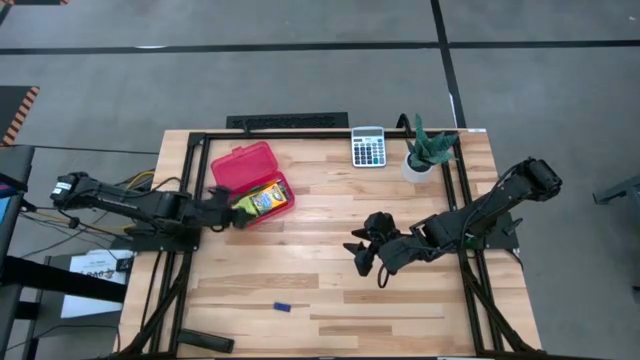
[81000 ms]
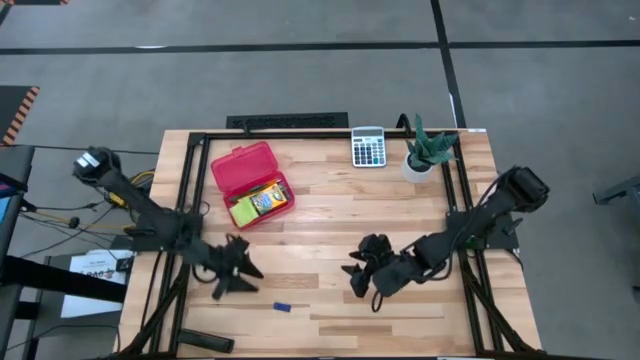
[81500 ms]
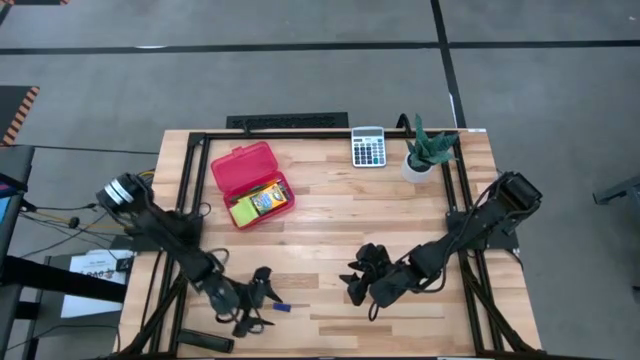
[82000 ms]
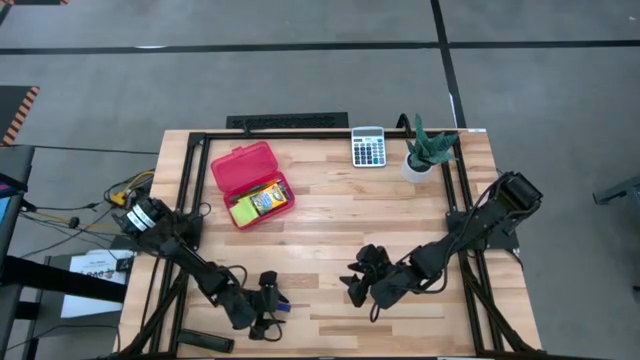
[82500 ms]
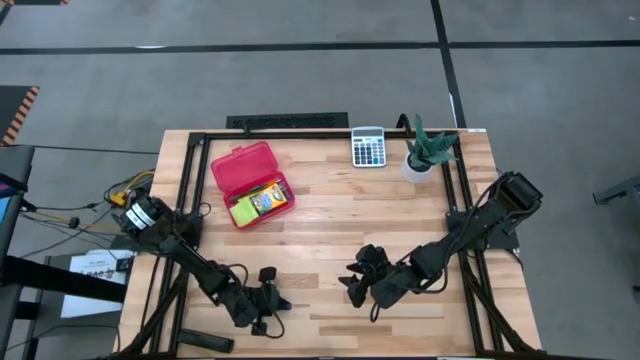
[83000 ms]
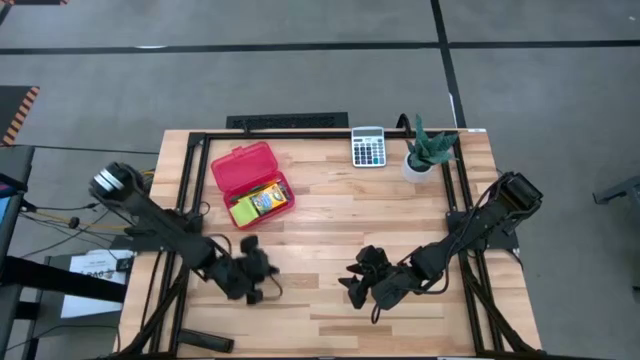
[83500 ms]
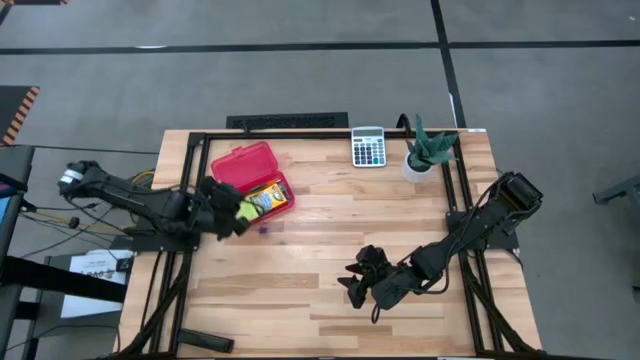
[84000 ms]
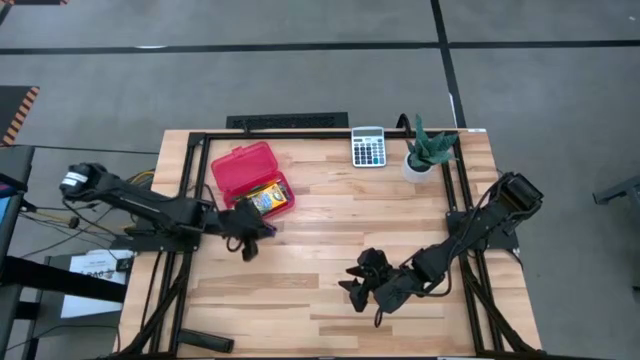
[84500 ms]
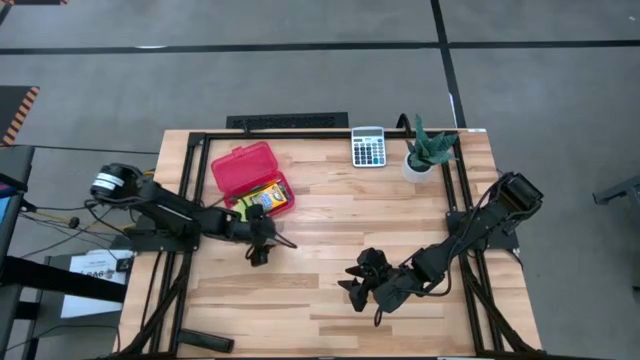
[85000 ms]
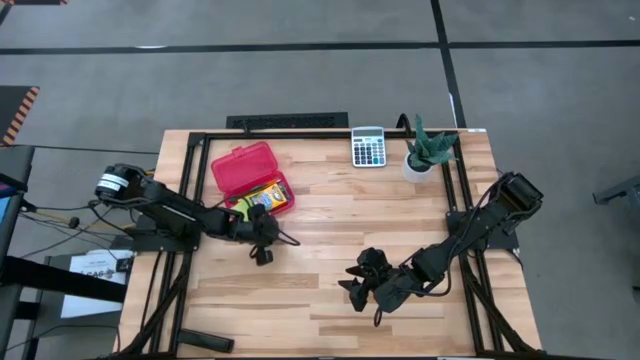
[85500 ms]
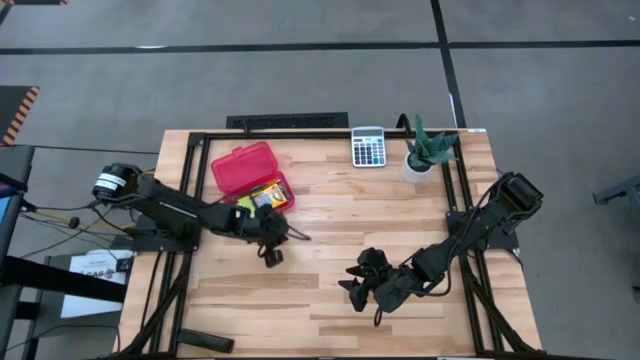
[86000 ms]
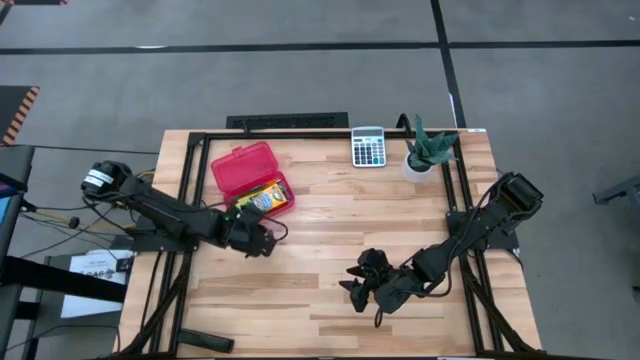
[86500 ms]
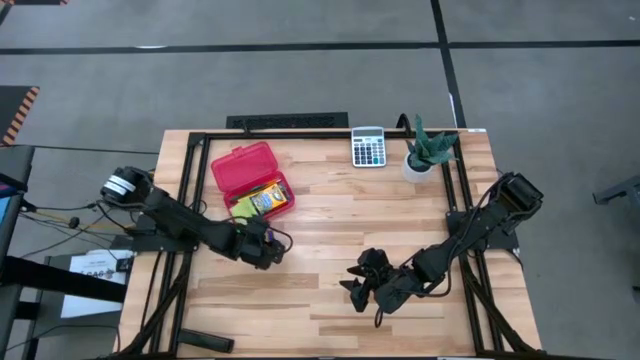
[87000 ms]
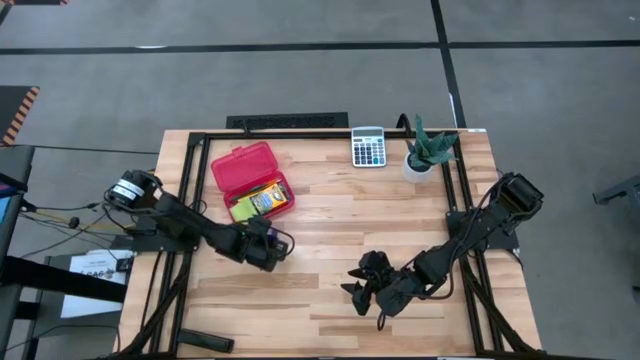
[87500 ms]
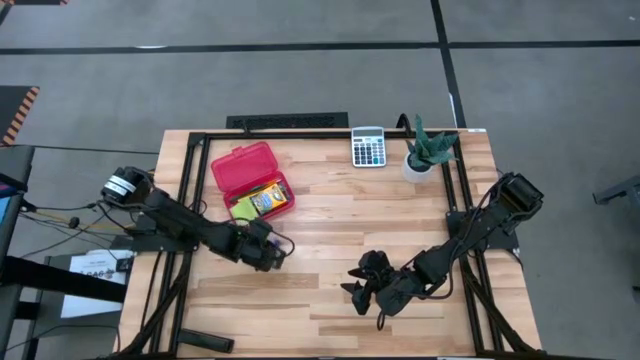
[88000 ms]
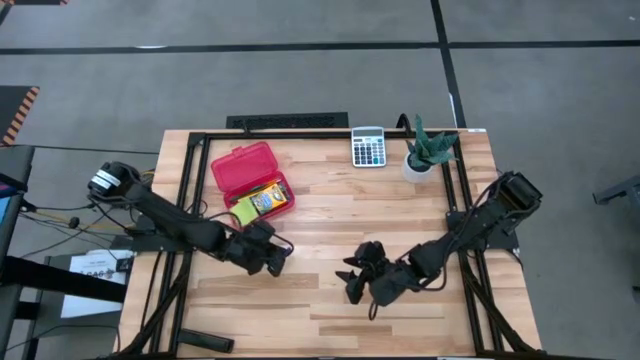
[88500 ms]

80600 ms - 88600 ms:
Task: Pack school essentials
Put the purple eraser into the red supply box

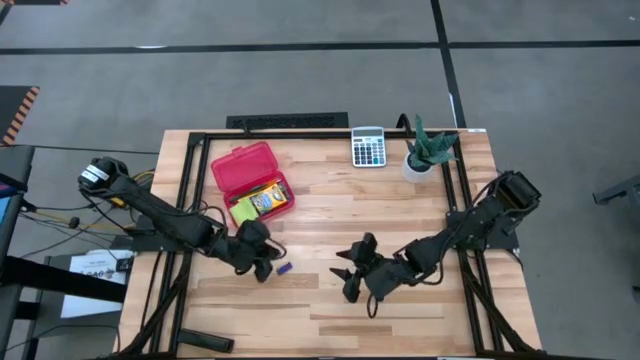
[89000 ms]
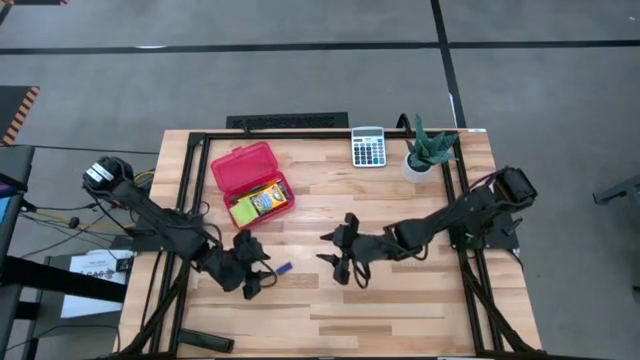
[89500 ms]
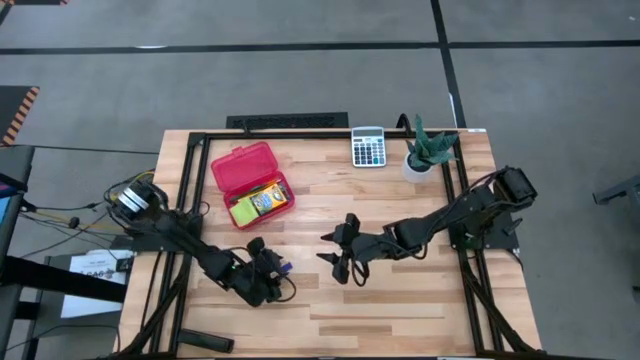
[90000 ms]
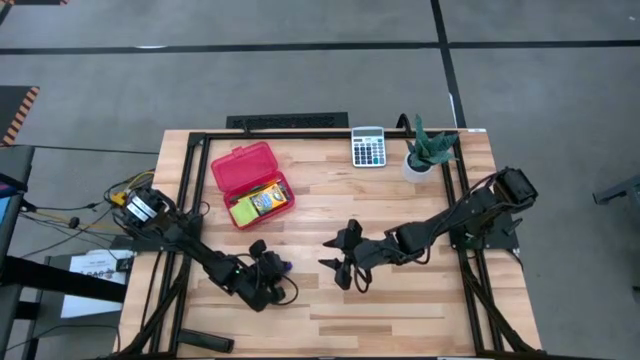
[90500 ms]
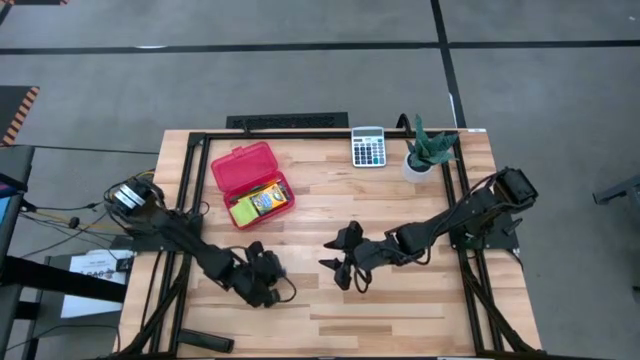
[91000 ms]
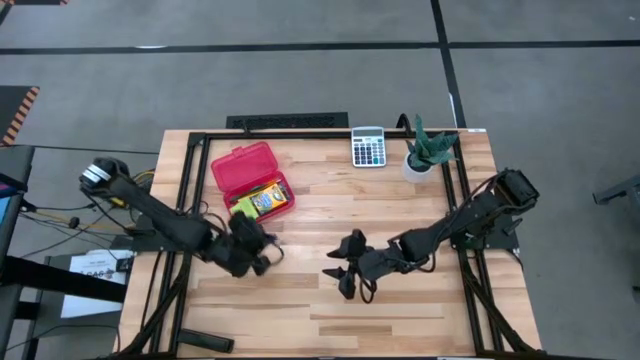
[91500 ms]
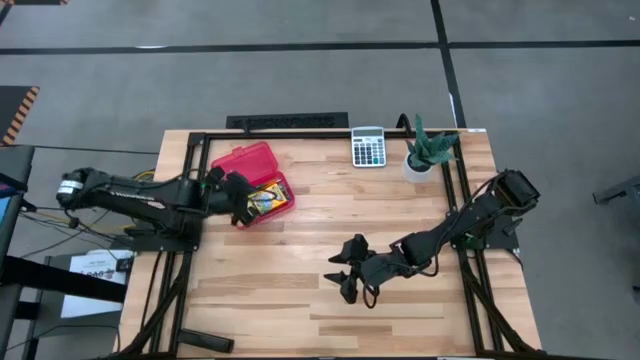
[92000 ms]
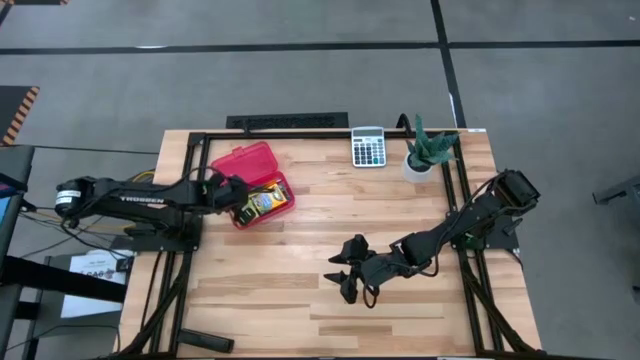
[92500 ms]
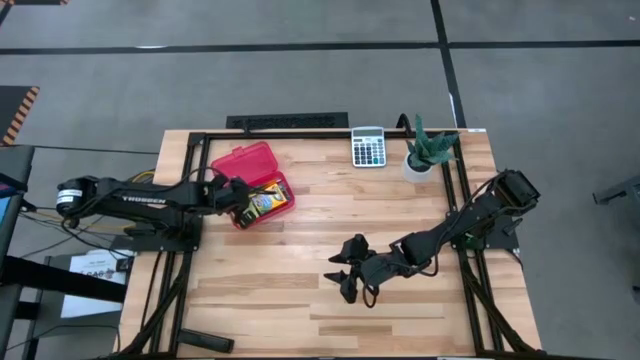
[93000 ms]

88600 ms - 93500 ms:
Put the purple eraser into the red supply box

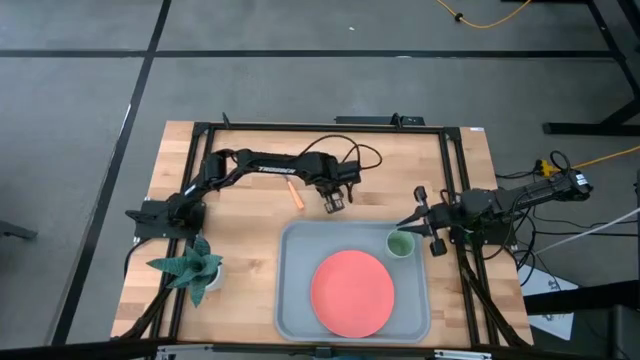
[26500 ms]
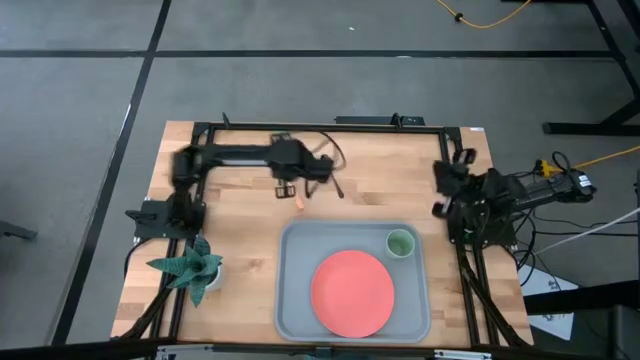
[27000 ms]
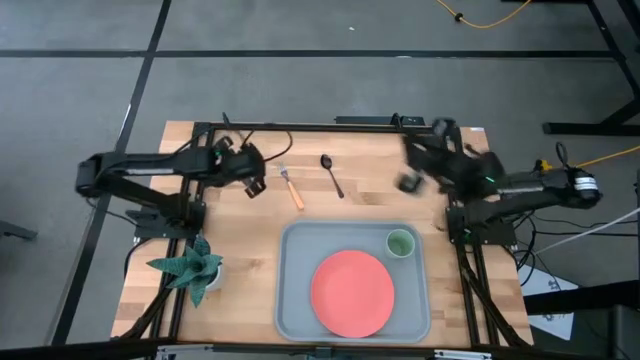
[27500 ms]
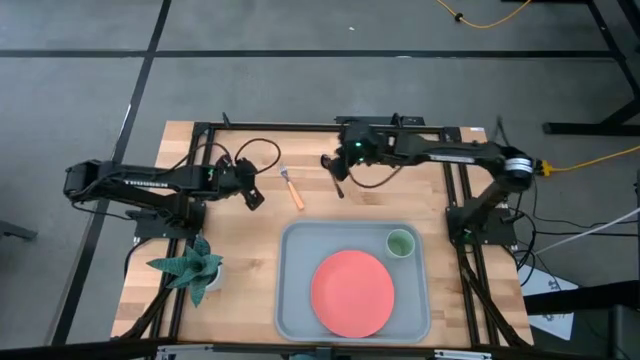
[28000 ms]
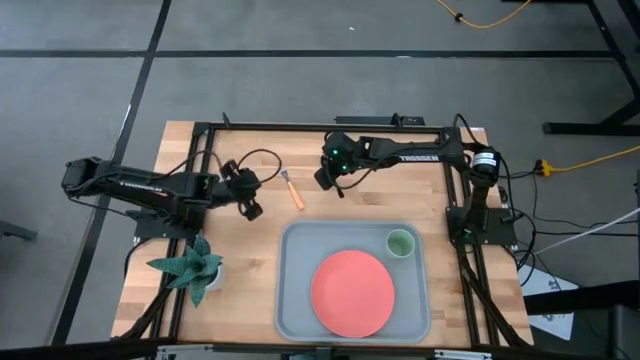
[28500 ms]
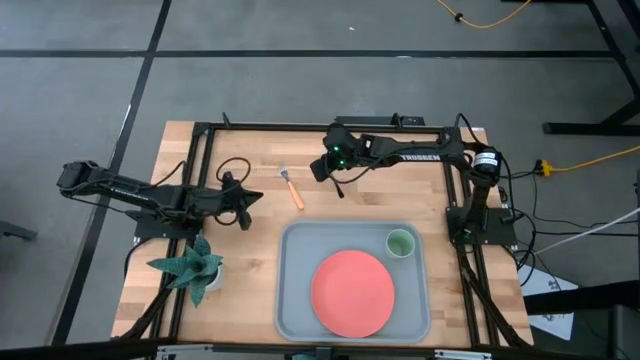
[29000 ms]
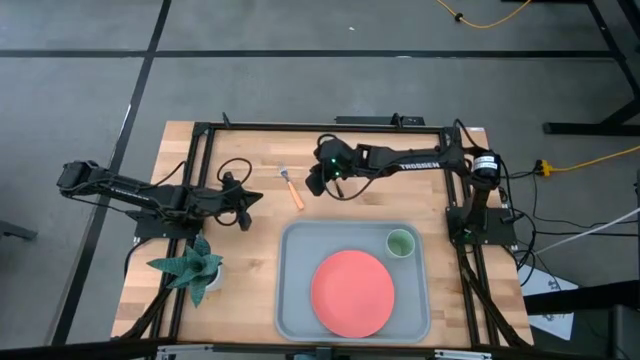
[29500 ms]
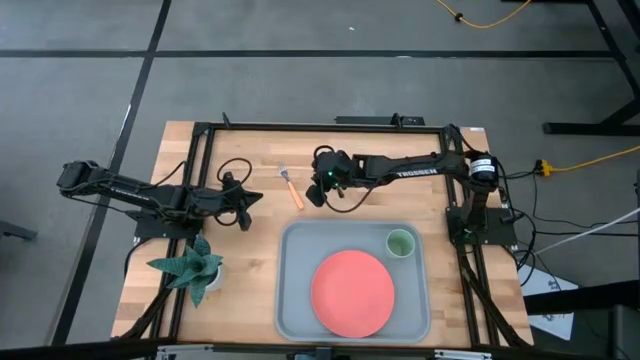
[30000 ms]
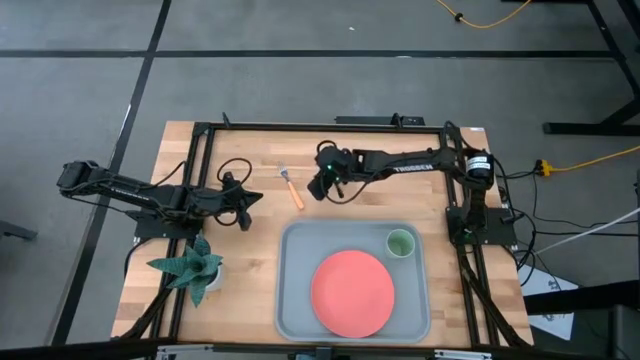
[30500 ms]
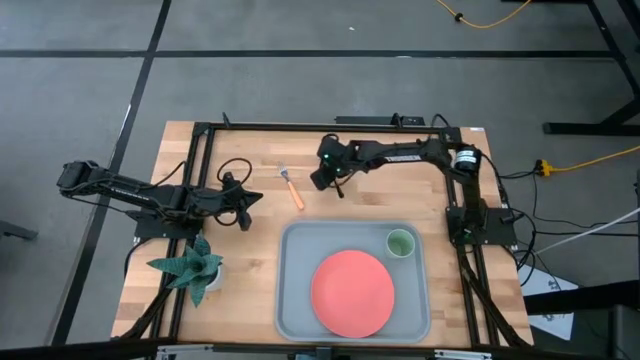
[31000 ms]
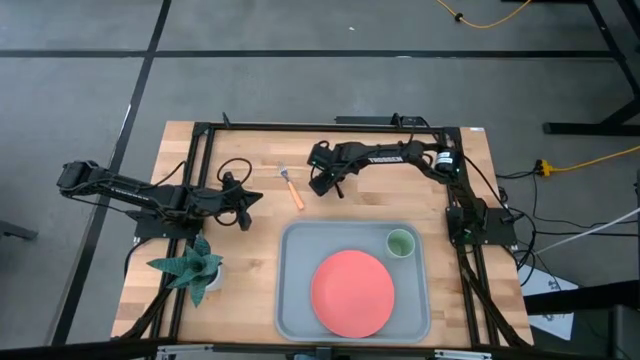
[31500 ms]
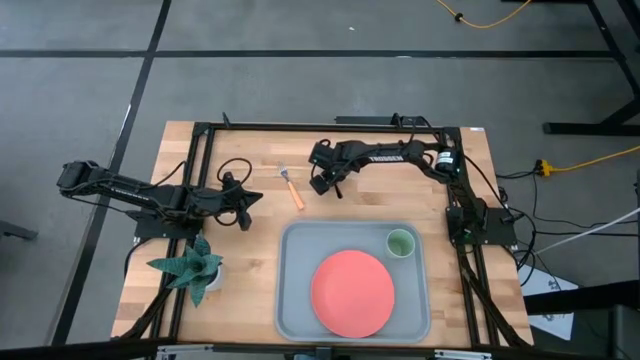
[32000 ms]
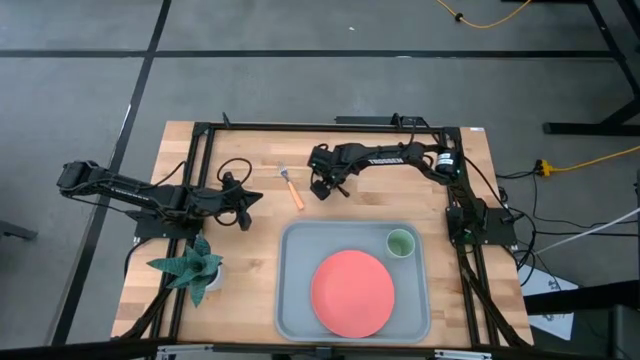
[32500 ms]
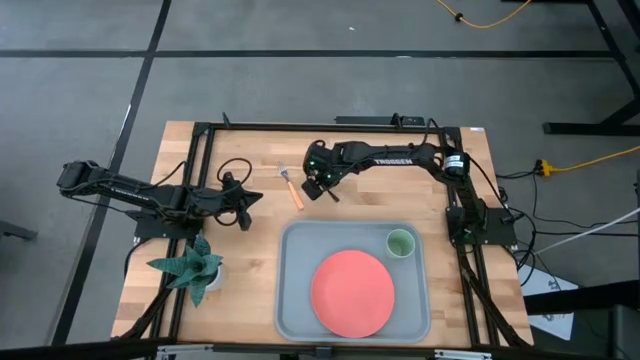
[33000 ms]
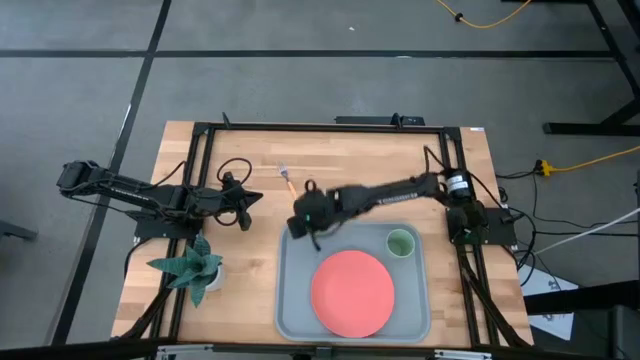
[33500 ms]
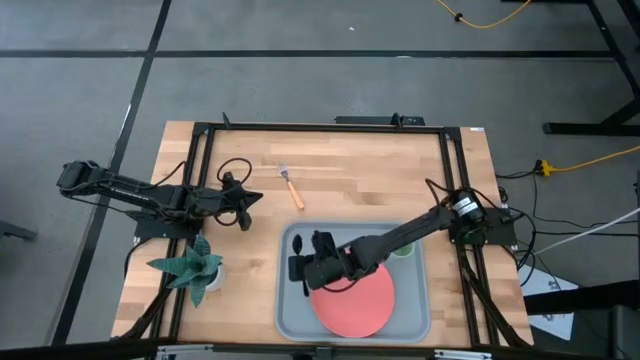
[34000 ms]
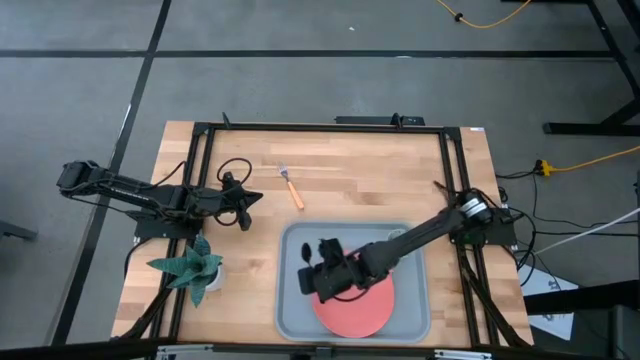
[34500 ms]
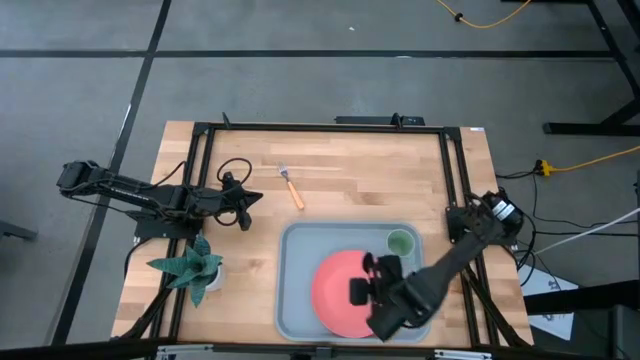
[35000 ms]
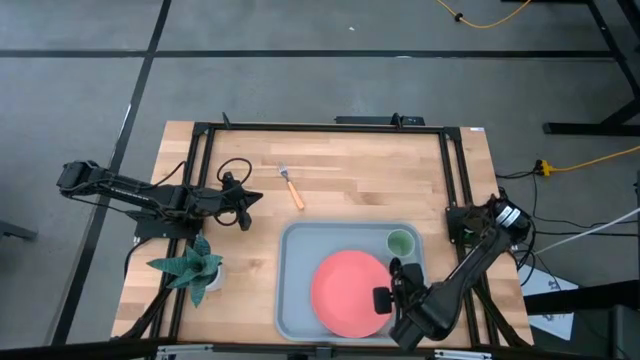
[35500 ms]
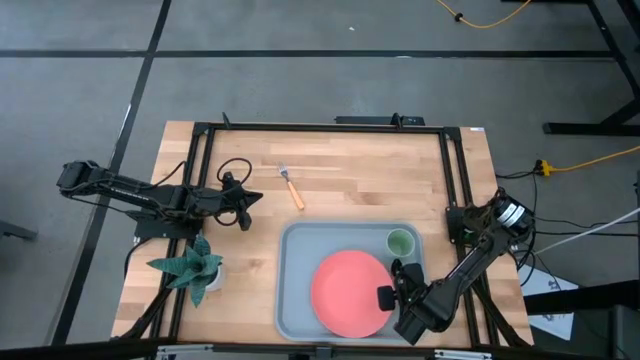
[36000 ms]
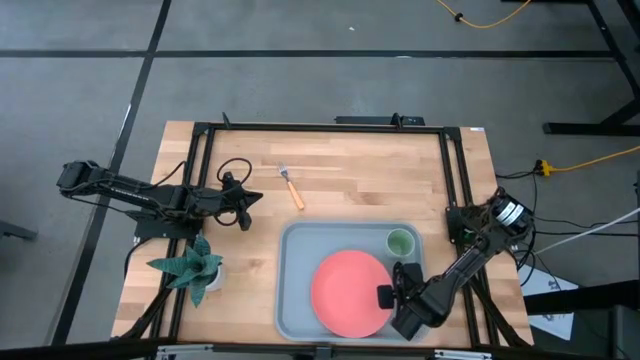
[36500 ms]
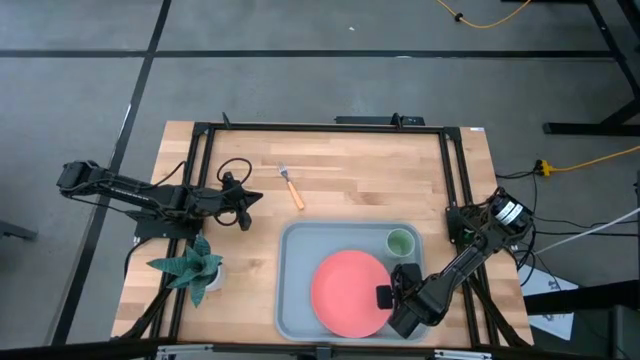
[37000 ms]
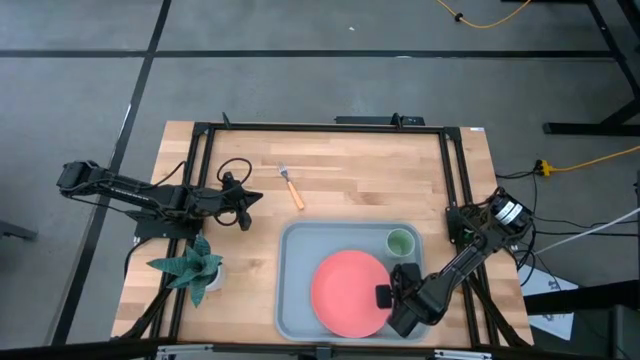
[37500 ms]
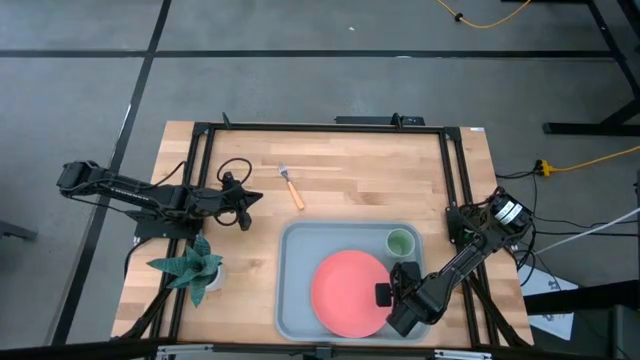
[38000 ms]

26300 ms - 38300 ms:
Task: Pick and place plate/cup/fork/spoon on tray
Put the black spoon on the gray serving tray to the right of the pink plate
